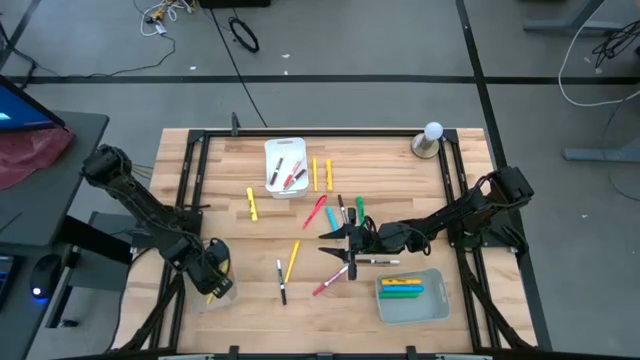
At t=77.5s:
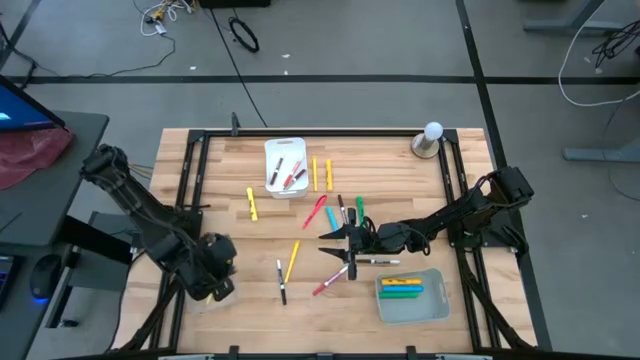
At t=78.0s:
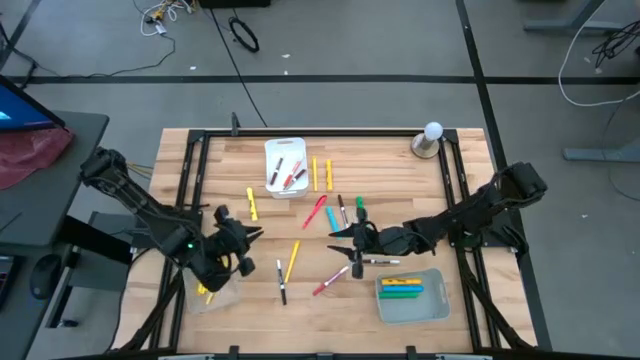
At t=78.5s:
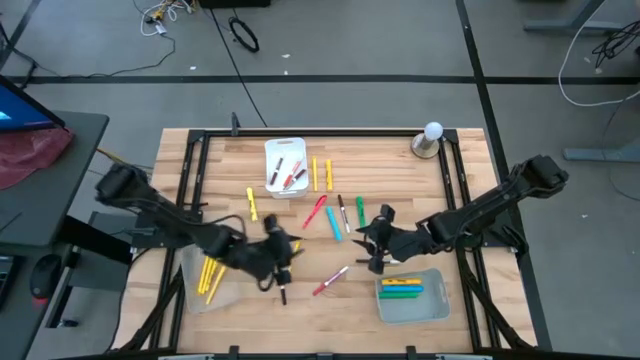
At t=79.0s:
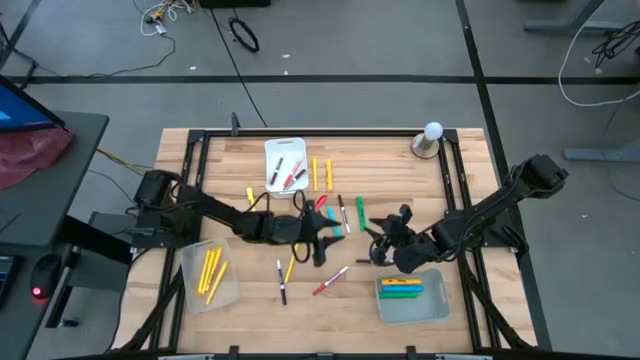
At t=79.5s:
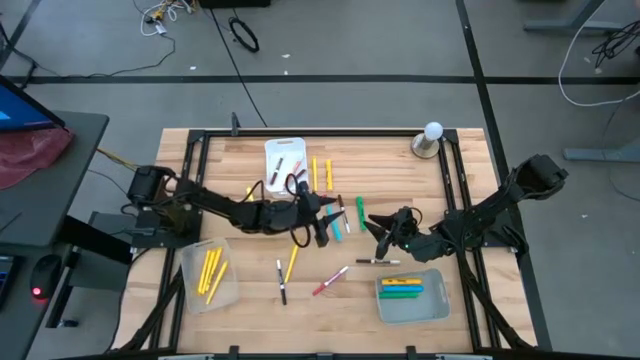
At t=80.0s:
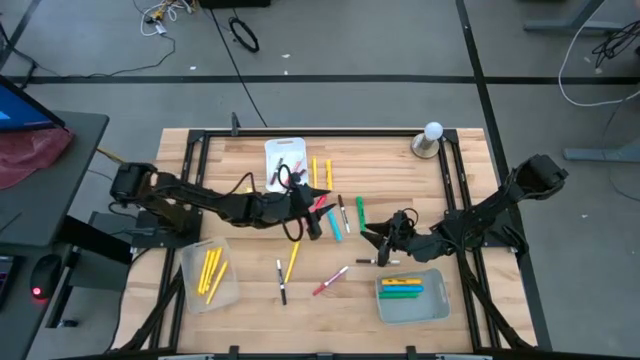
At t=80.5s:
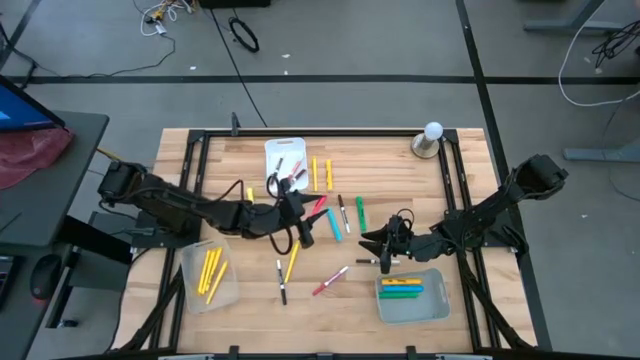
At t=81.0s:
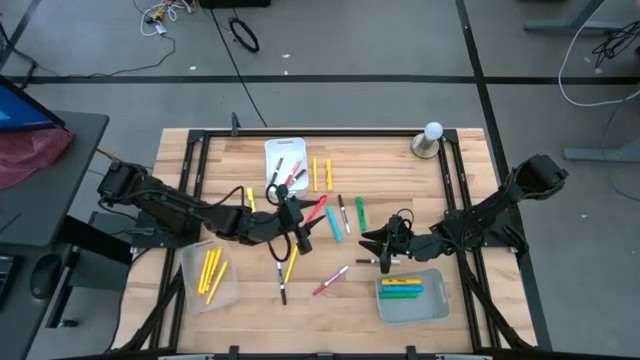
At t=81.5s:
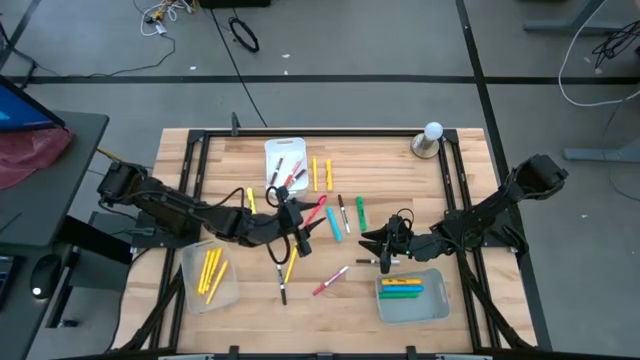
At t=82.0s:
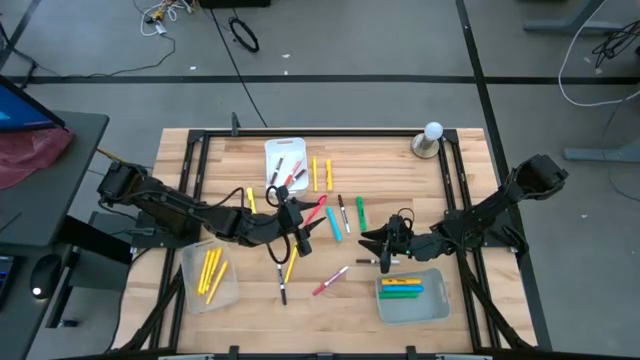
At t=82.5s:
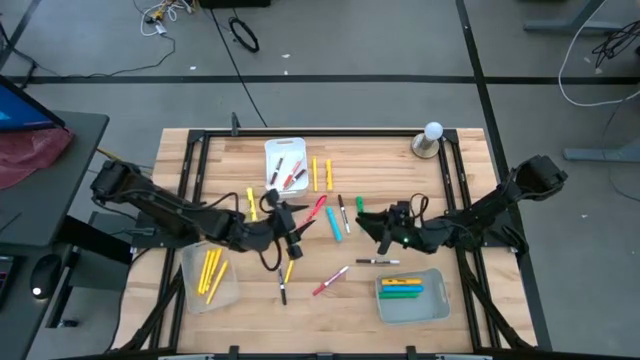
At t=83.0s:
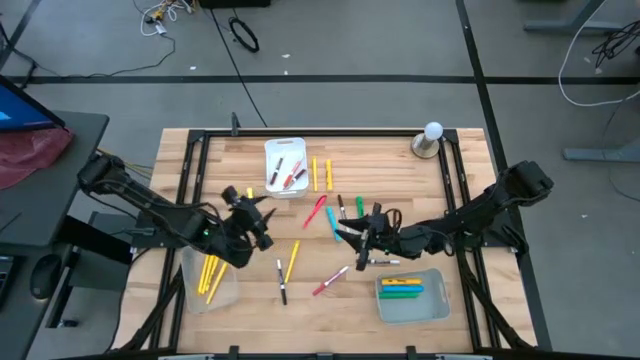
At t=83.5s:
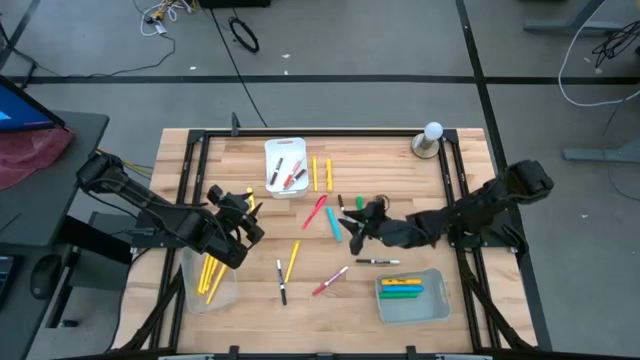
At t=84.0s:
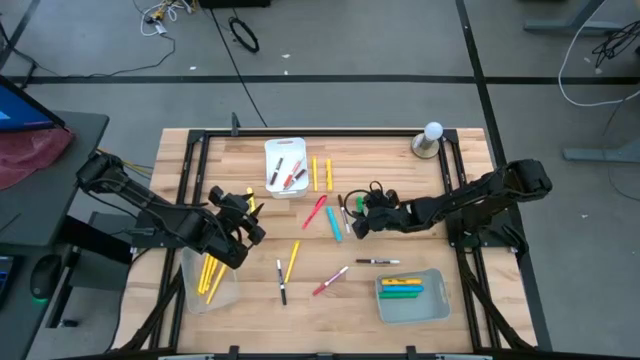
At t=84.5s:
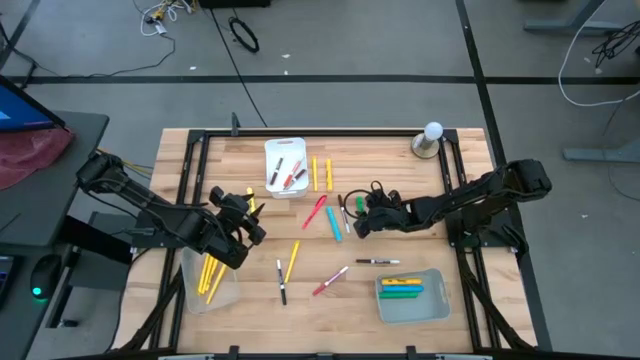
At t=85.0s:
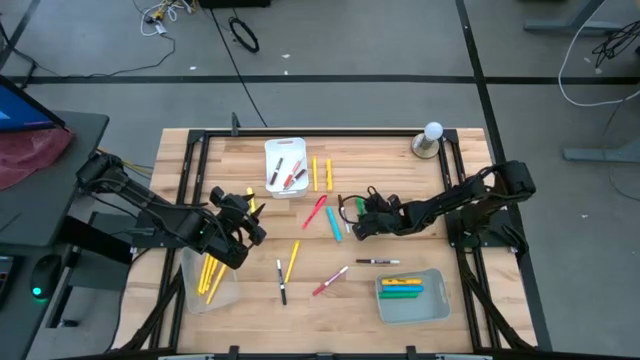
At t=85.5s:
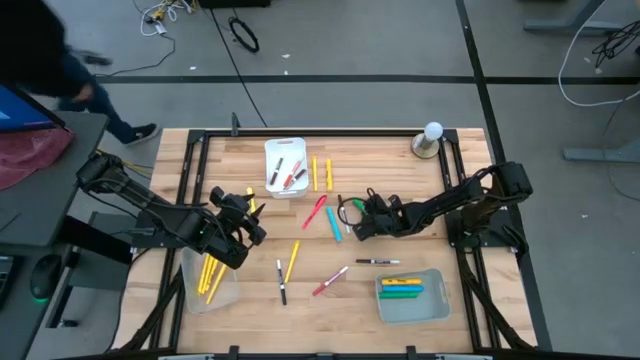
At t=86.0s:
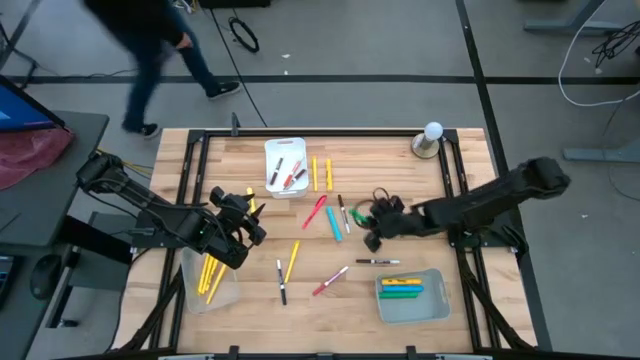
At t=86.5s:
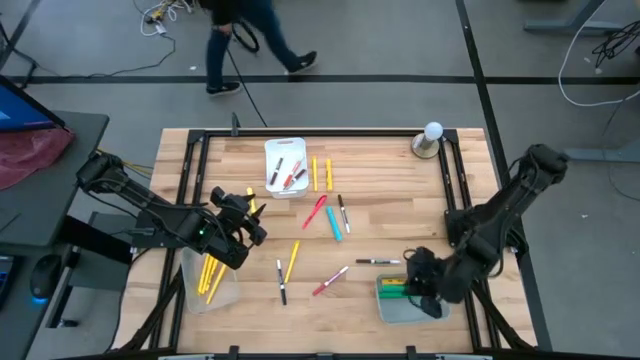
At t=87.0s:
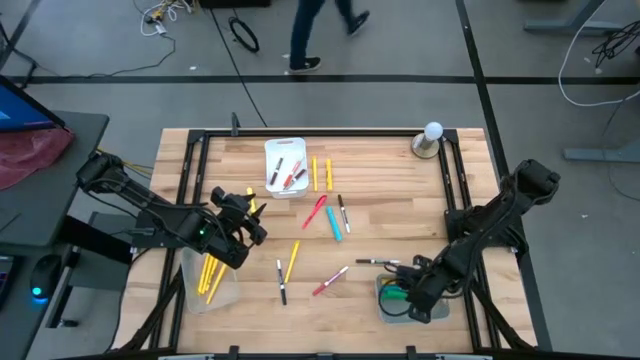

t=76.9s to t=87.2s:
Task: Pick & Place Markers
Put the green highlighter pen into the gray bin

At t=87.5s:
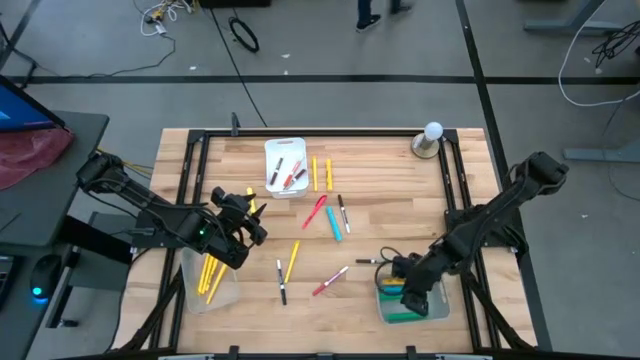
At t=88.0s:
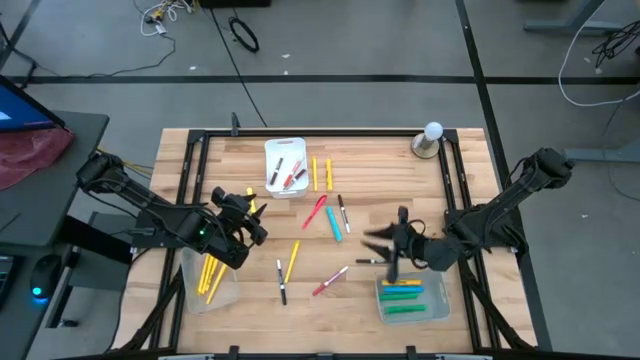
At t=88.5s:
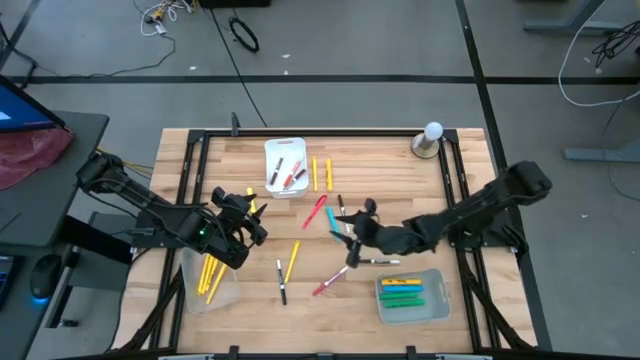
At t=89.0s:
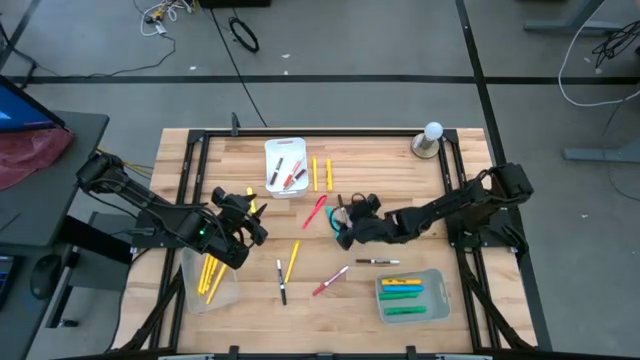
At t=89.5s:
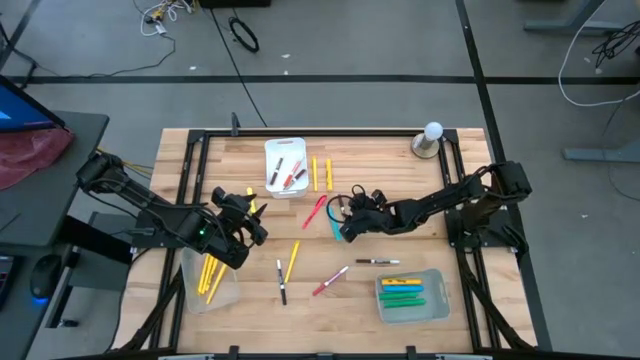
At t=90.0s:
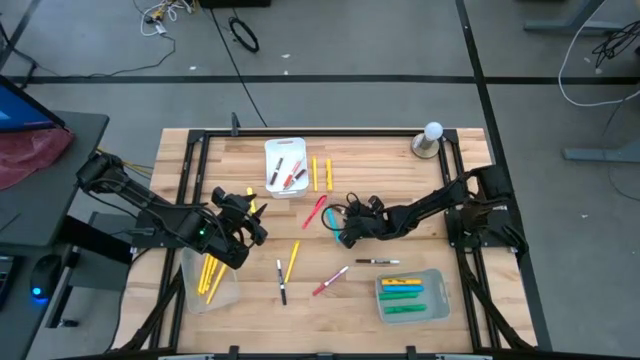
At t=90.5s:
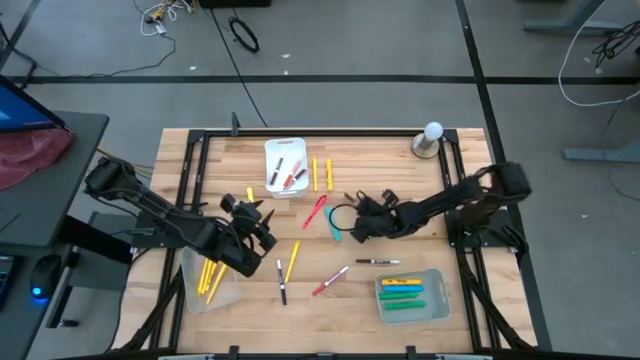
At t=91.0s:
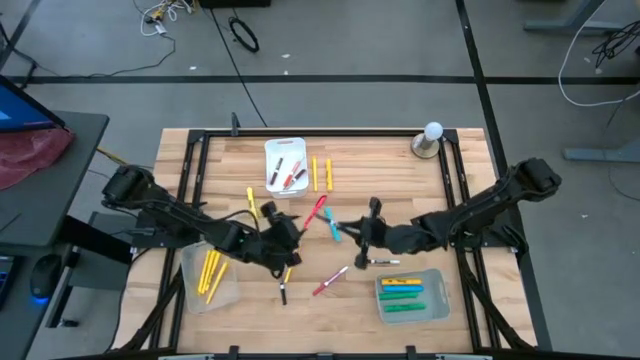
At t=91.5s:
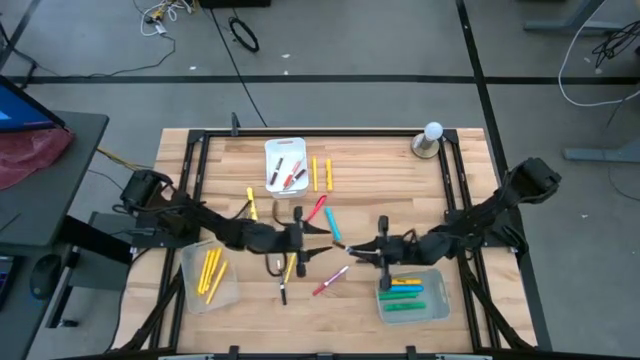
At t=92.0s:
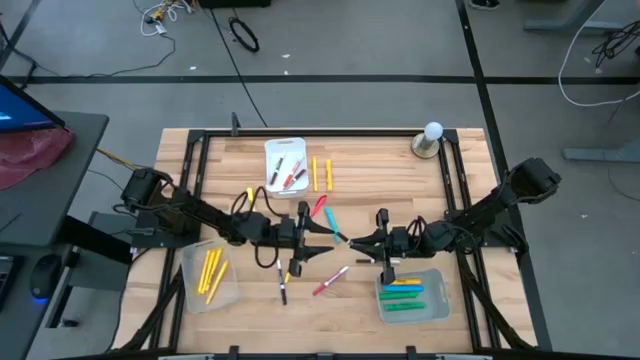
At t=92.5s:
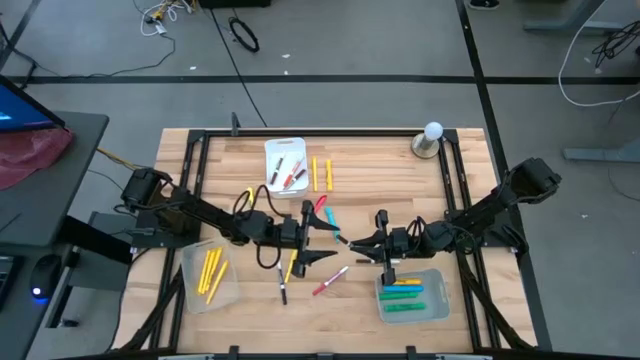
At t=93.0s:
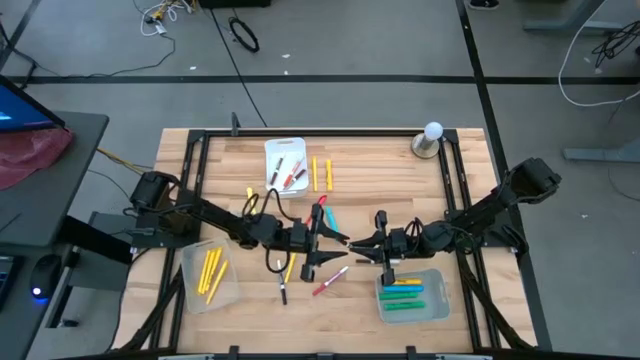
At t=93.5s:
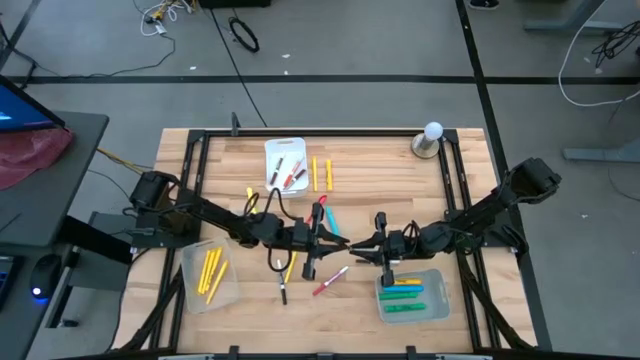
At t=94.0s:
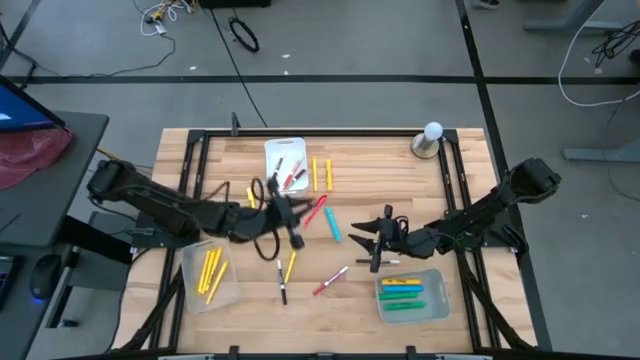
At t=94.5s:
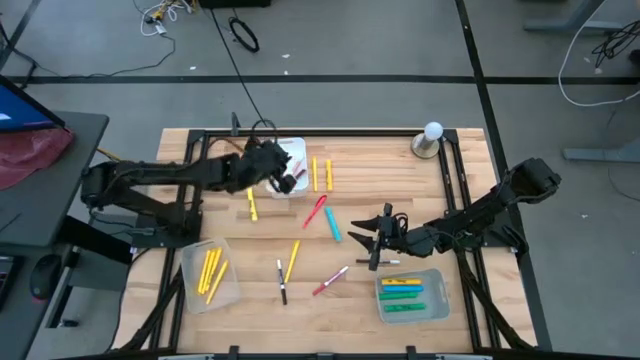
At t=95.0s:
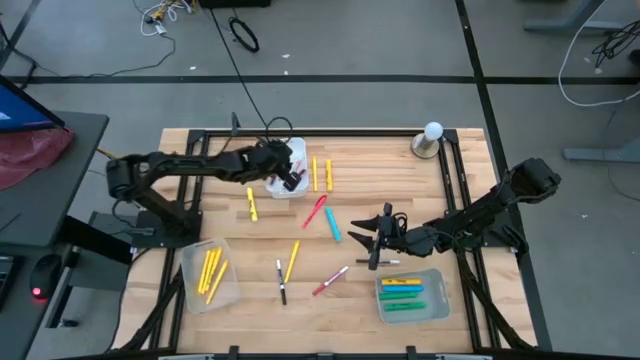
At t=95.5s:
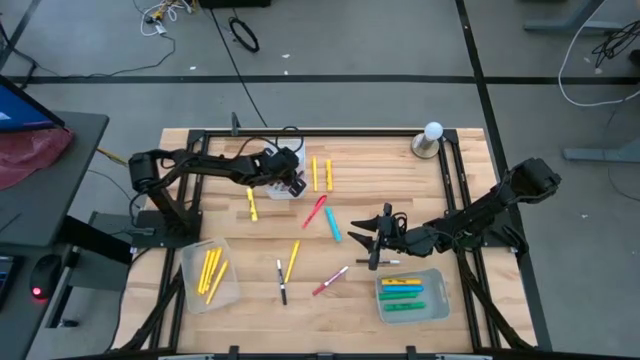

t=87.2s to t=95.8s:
Put the brown marker pen into the white bin

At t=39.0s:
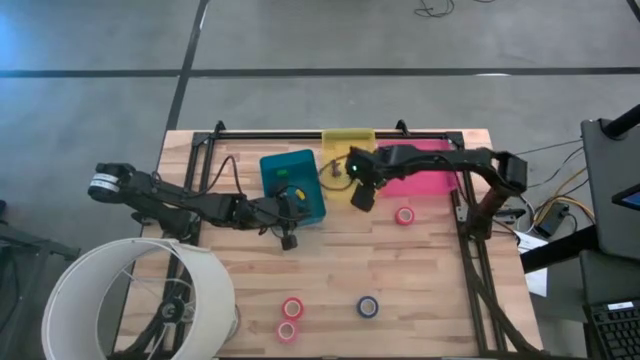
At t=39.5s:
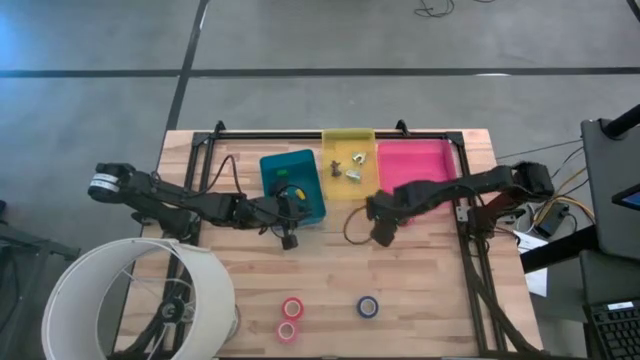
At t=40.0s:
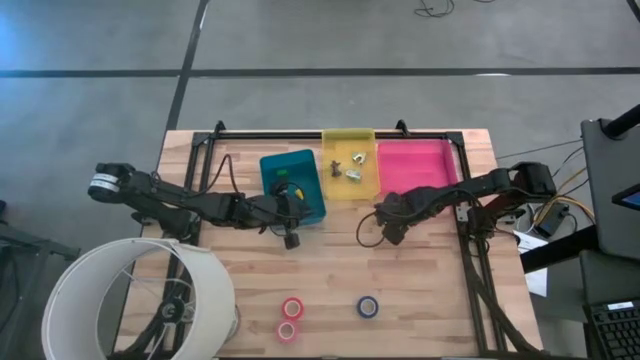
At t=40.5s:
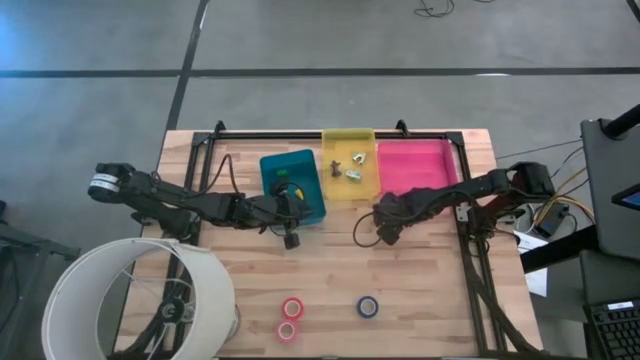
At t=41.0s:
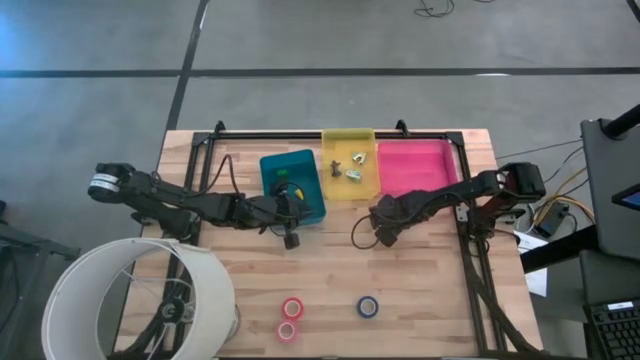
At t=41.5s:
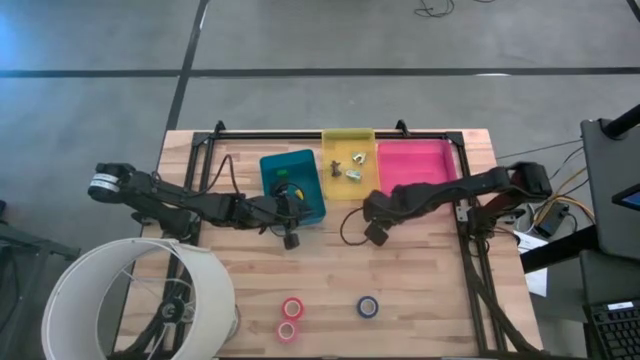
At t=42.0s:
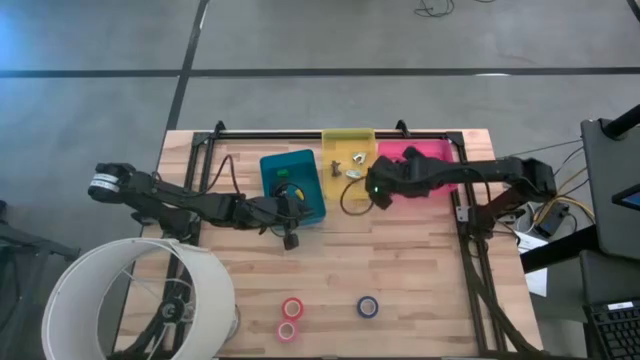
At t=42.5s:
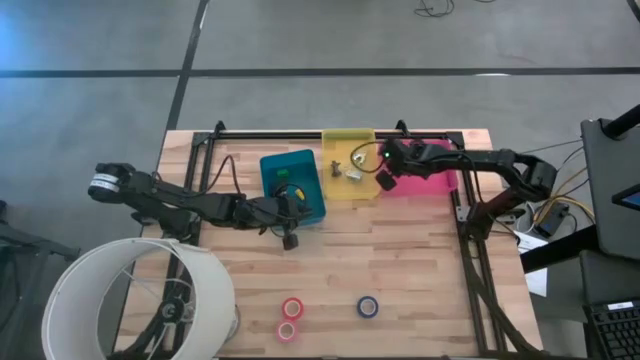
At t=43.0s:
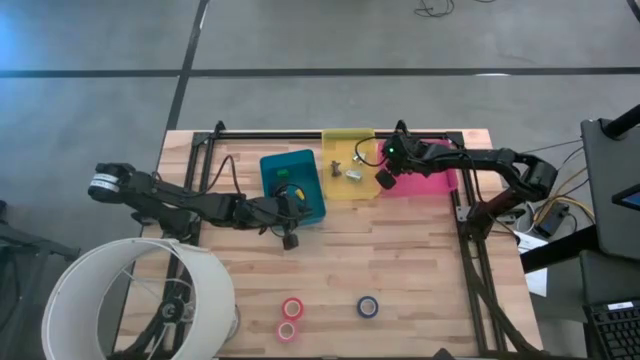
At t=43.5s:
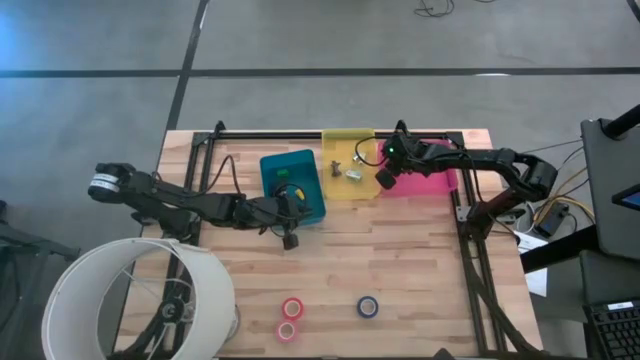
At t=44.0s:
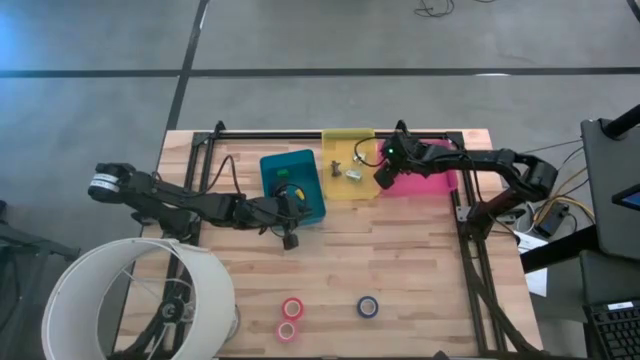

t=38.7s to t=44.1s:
Task: Pick and place Stapler, Stapler remover, tape
Put the top red tape into the red bin
